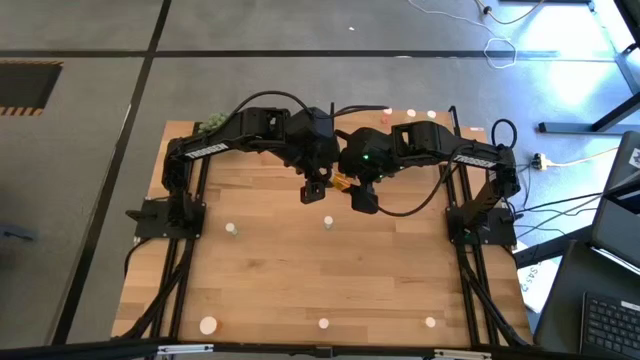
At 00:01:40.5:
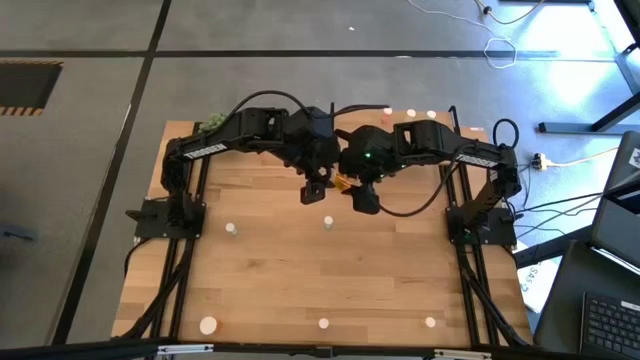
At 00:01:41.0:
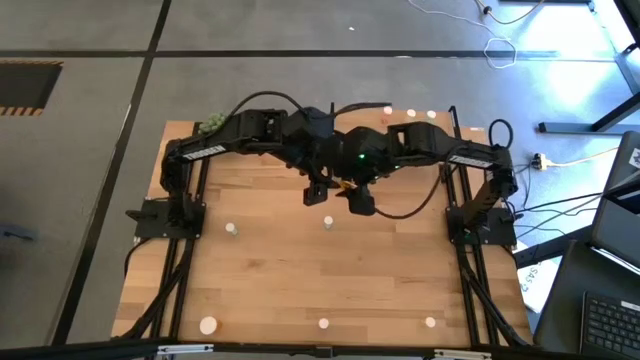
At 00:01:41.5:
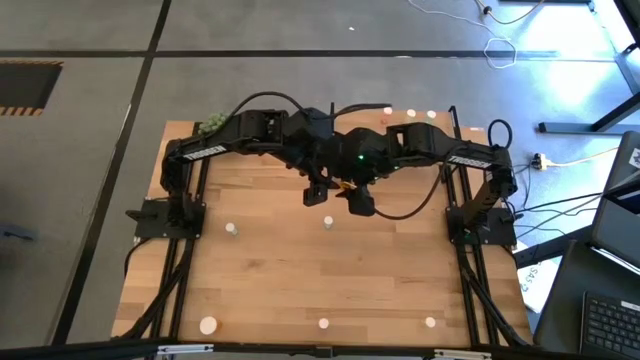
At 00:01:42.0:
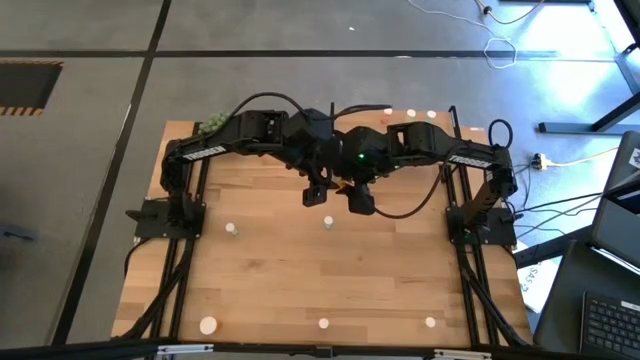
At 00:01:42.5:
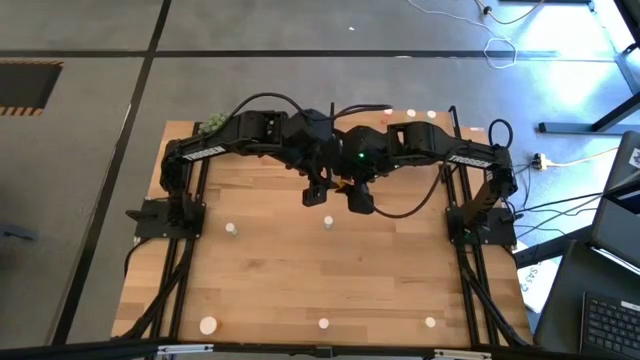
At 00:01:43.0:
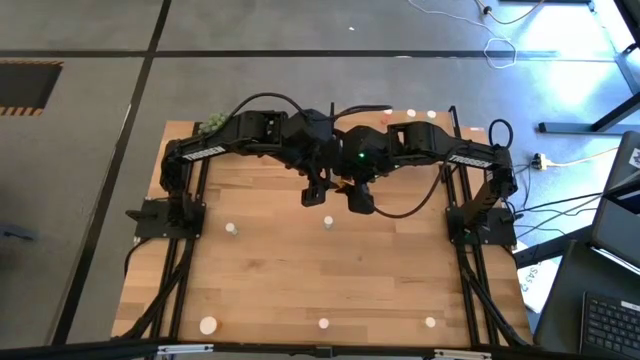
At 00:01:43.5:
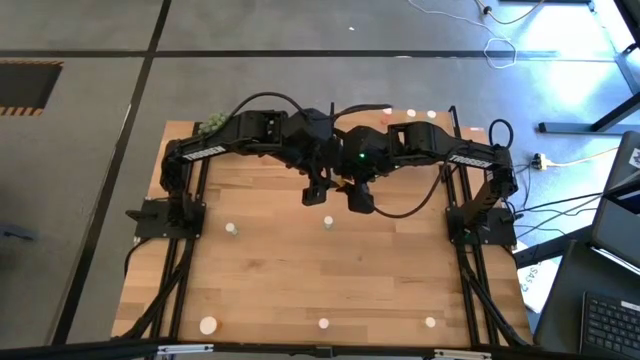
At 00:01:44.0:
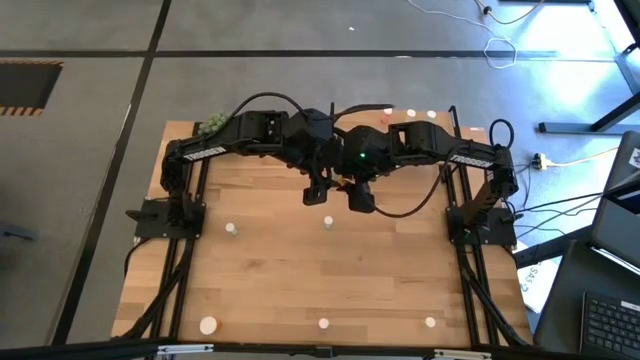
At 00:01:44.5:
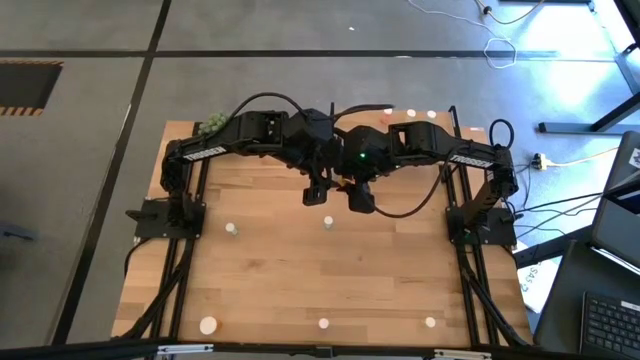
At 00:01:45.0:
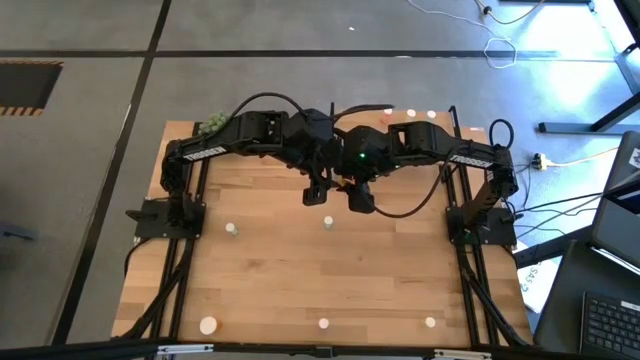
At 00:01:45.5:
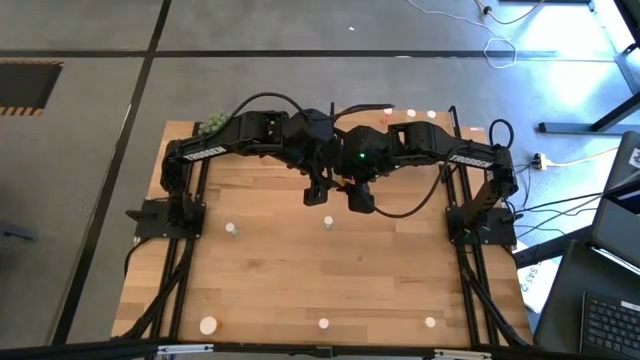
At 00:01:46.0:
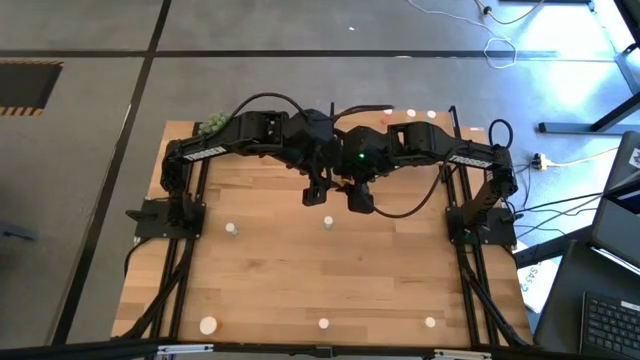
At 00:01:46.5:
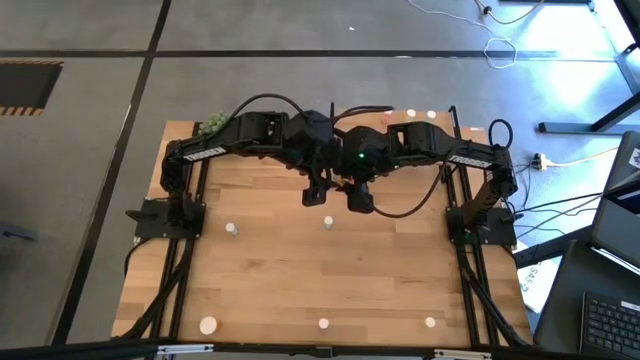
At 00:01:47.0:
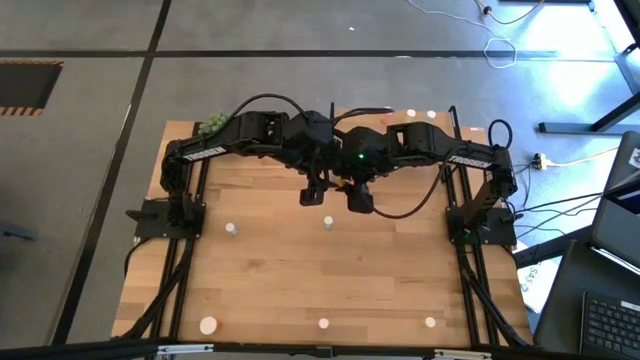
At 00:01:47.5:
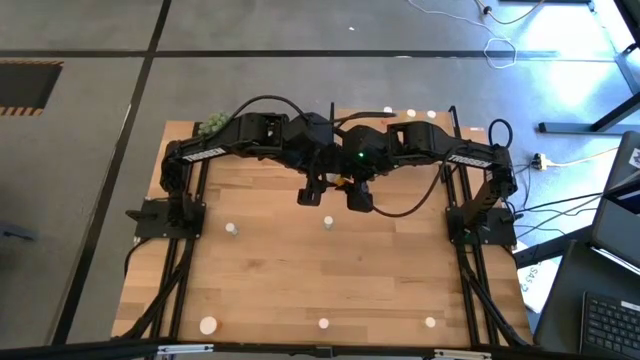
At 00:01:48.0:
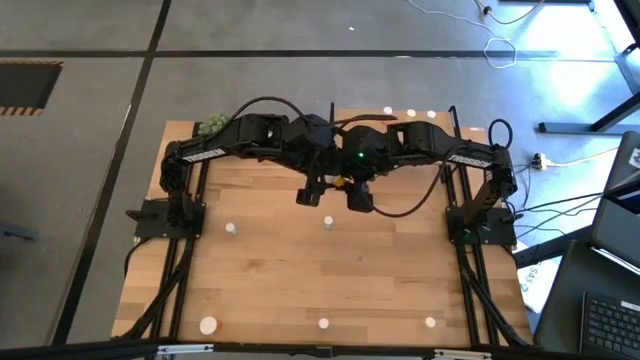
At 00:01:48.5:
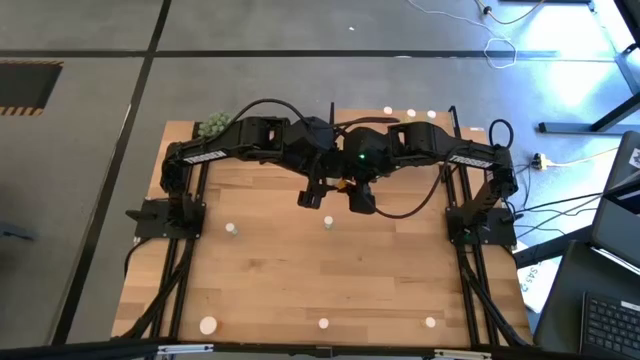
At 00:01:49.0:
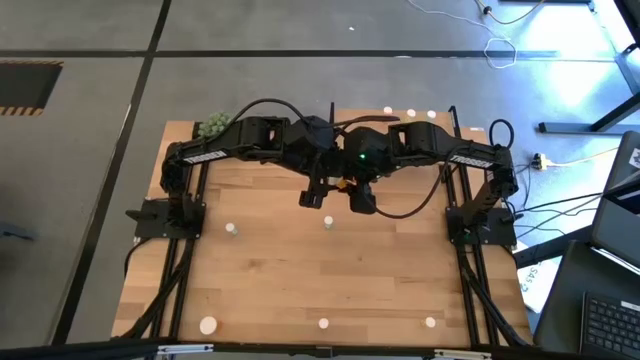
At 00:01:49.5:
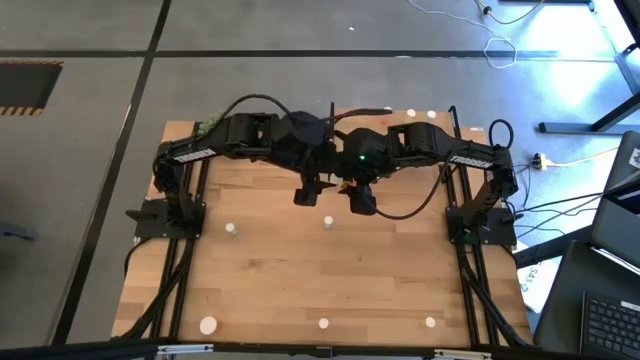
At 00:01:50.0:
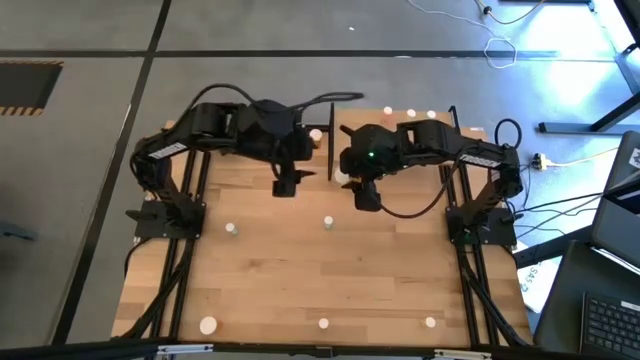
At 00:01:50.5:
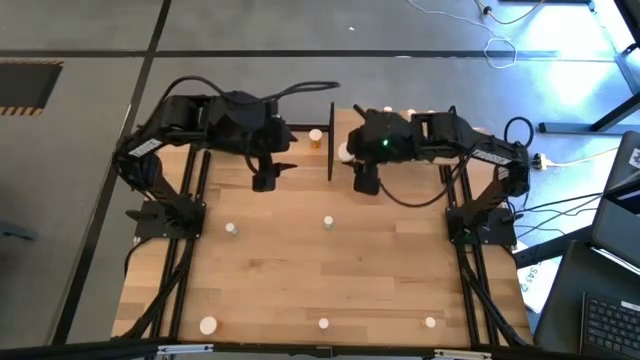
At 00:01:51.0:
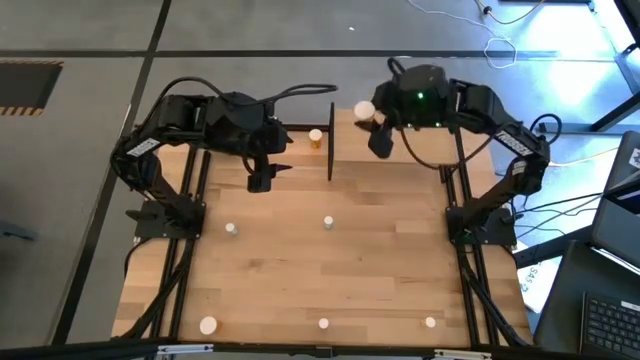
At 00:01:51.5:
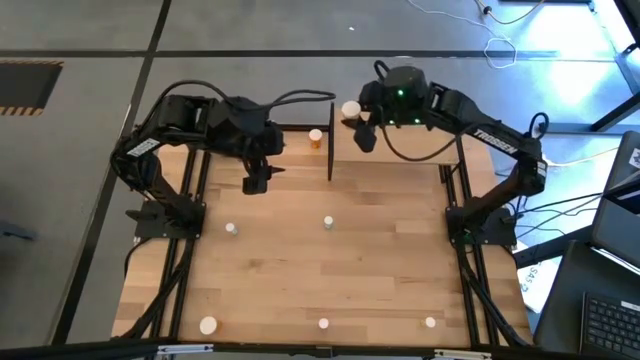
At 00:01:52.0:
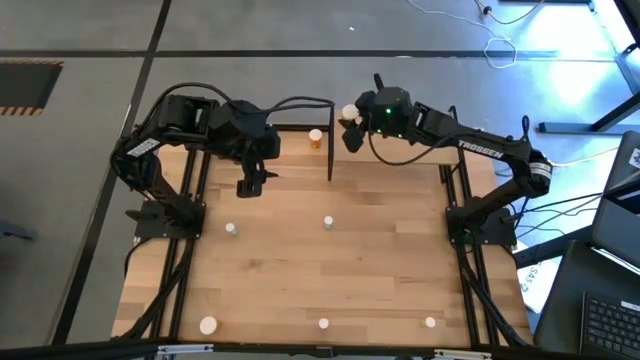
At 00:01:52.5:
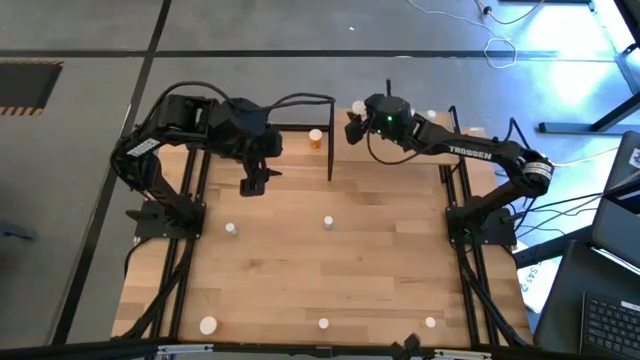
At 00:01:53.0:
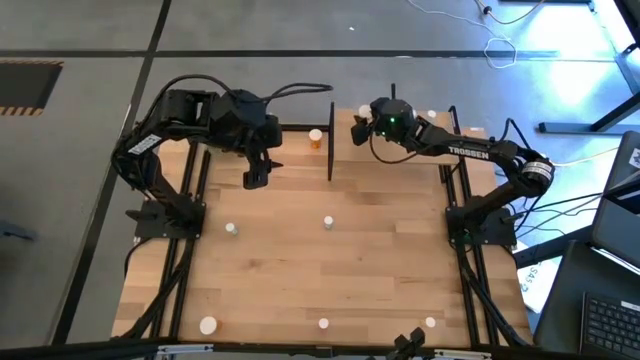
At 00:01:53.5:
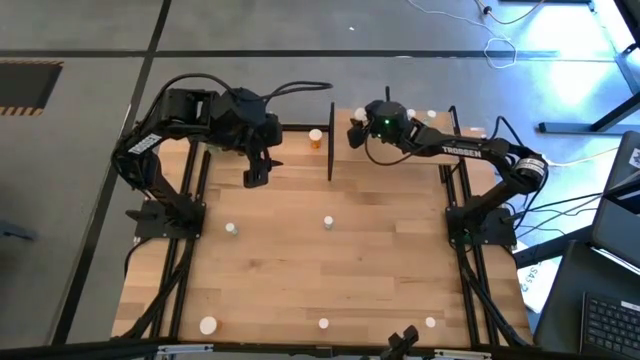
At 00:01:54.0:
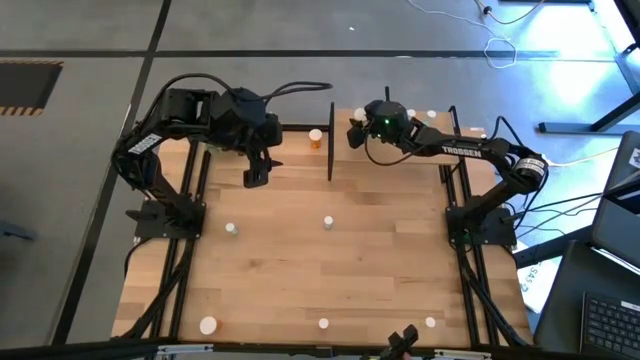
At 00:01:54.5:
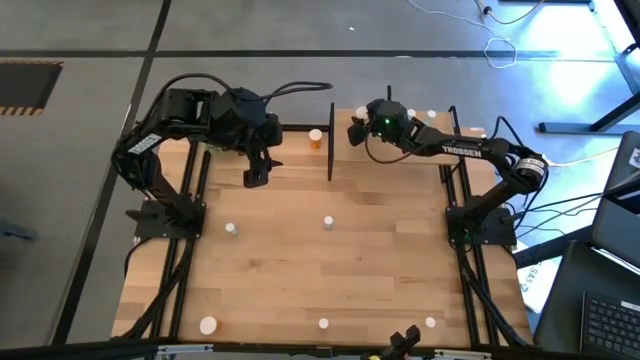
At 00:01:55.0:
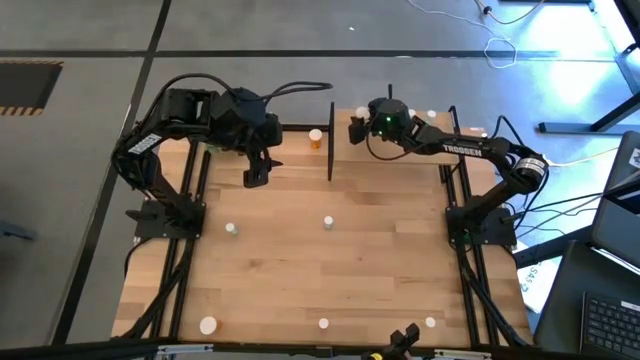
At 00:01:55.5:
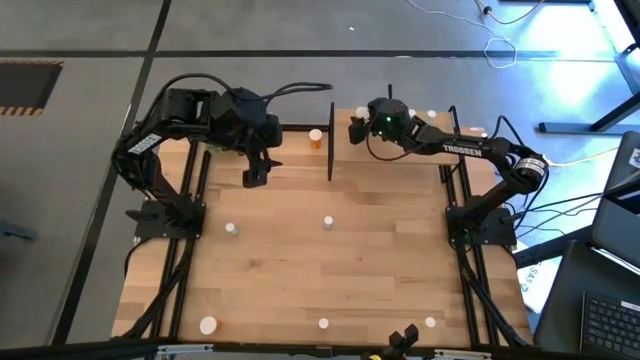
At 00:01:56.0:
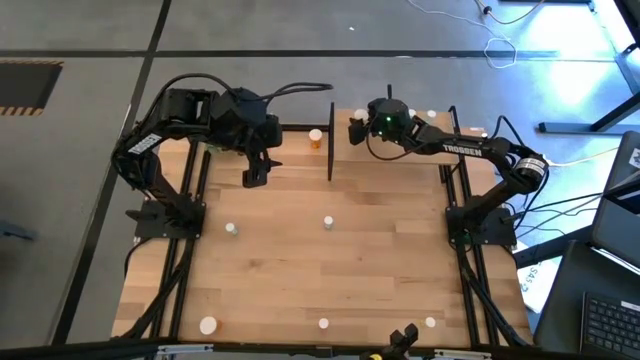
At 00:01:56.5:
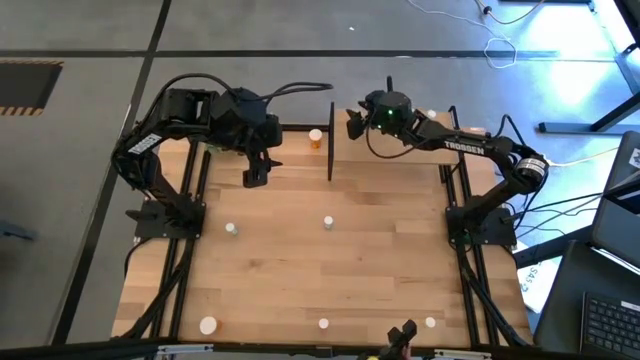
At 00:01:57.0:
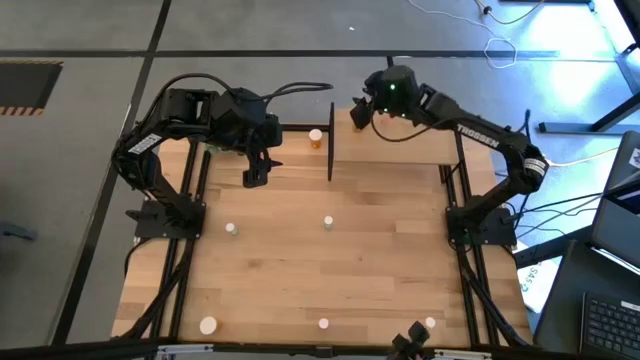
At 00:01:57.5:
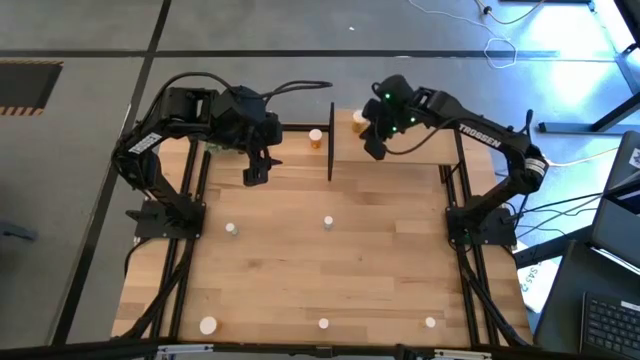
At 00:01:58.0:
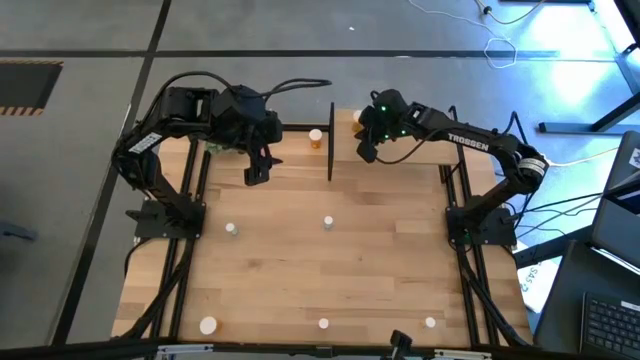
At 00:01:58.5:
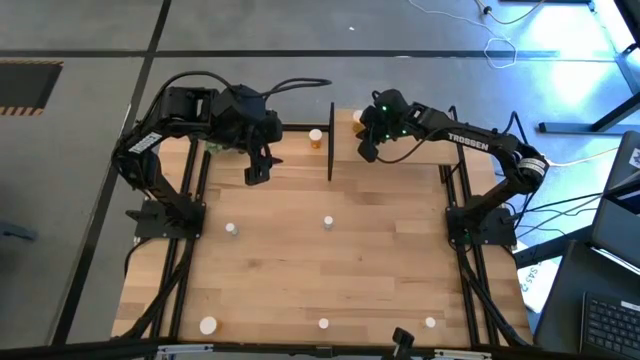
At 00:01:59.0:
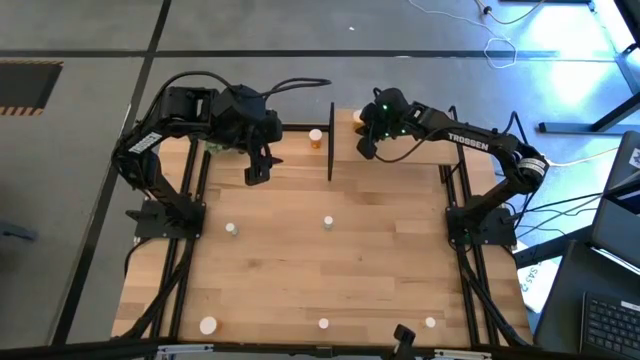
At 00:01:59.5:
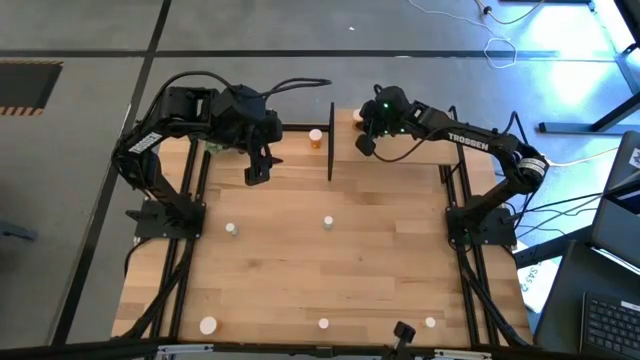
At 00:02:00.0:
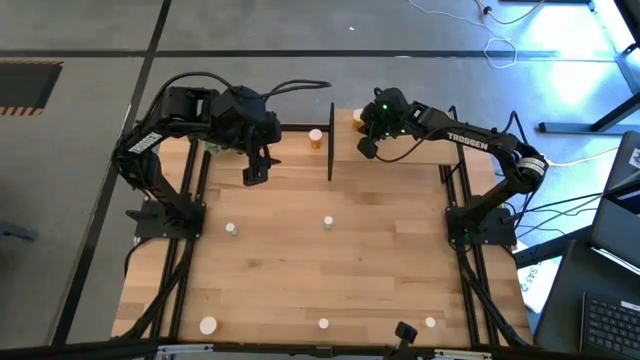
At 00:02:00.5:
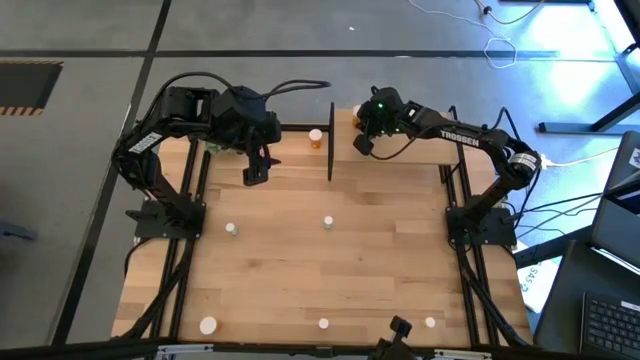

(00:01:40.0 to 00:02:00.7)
Task: Pick and place medicine bottles onto shelf by color
Put the middle orange pill bottle on the shelf
